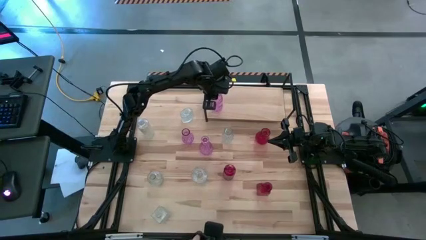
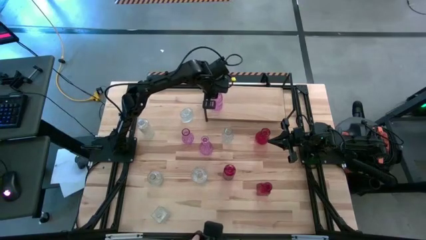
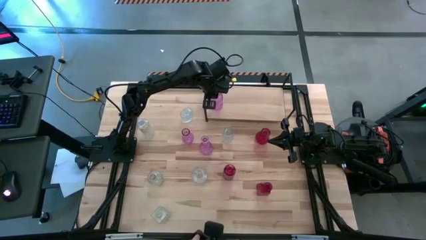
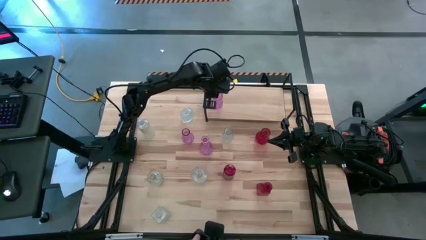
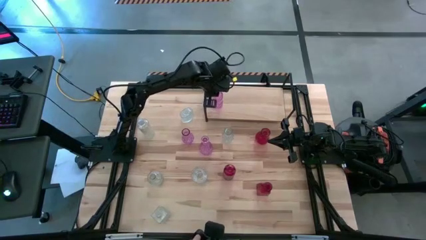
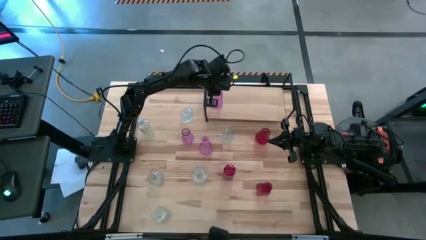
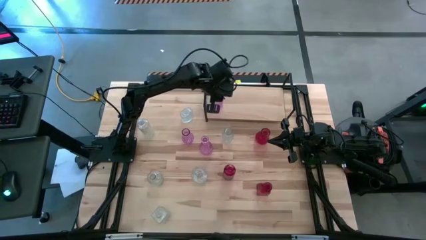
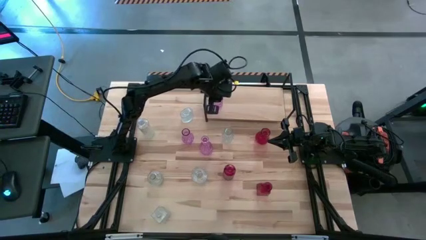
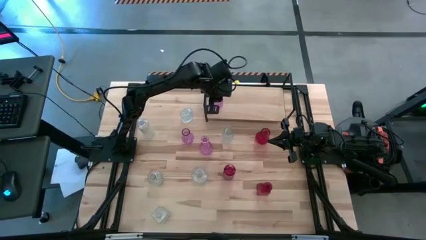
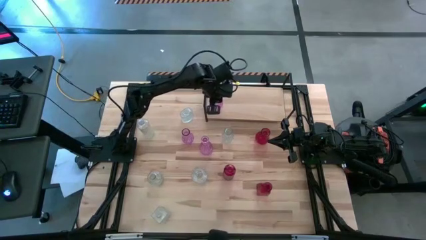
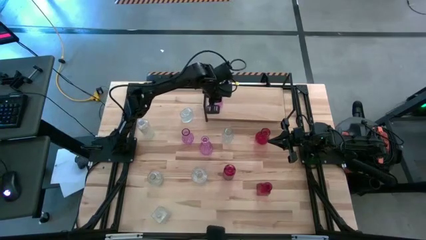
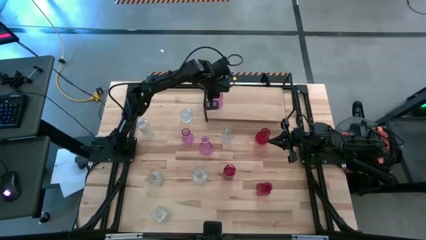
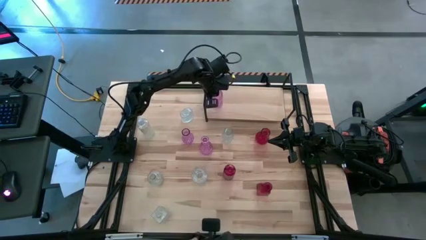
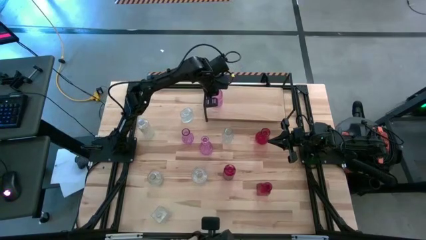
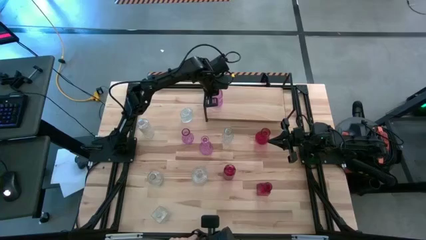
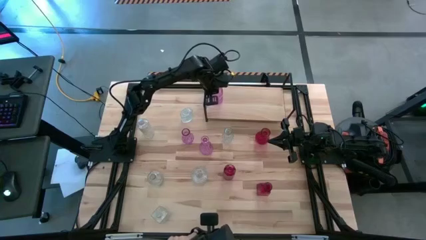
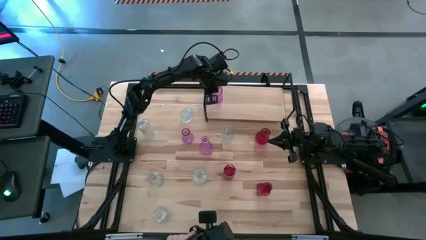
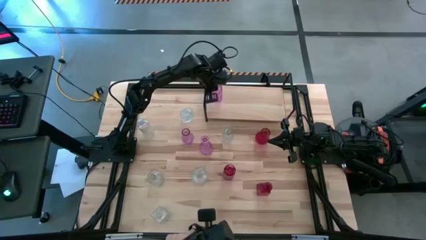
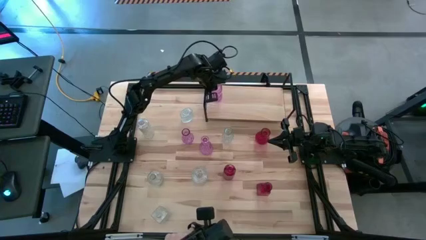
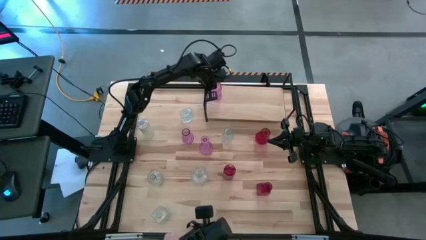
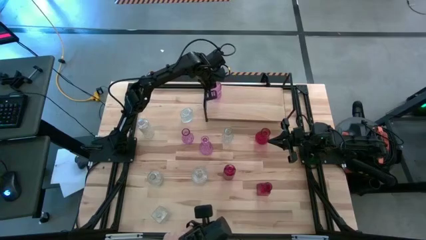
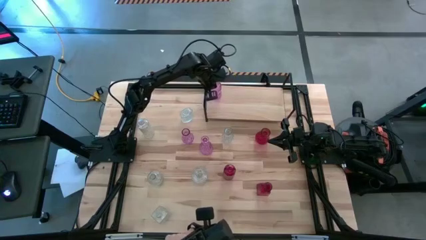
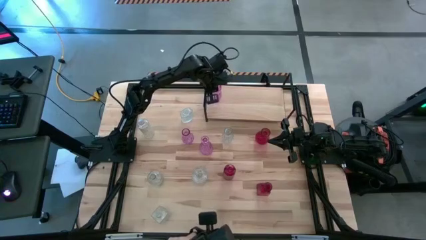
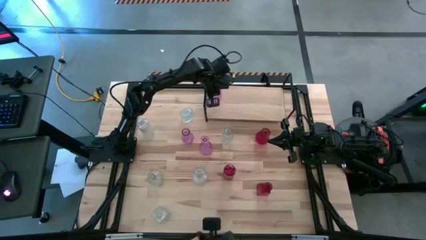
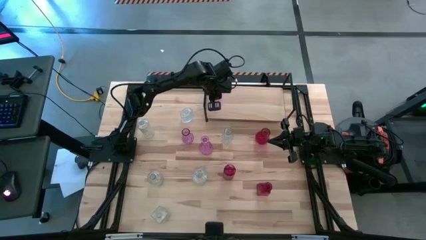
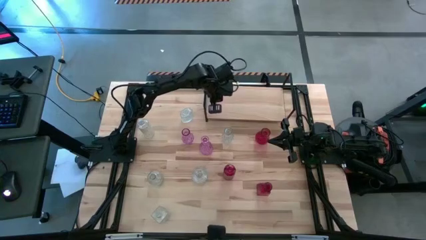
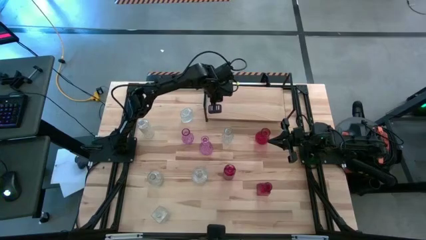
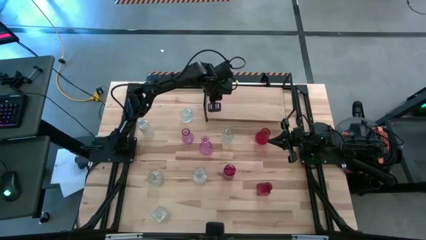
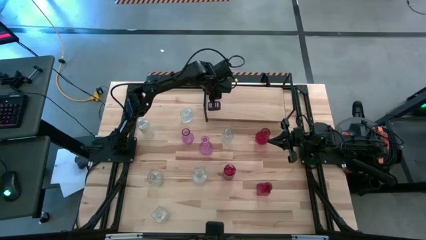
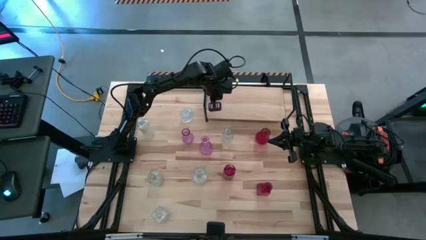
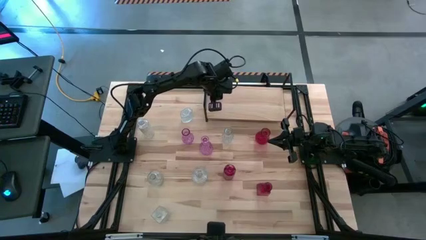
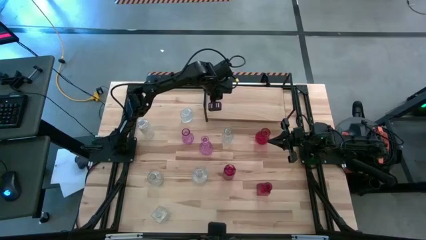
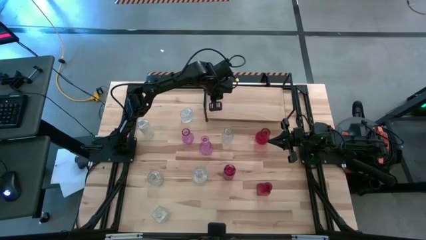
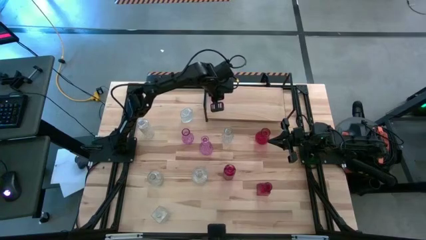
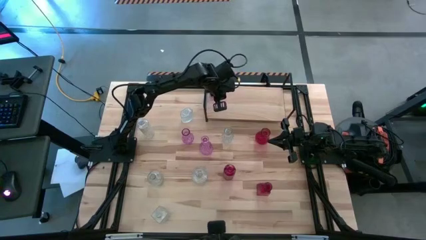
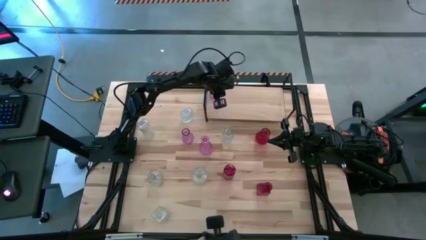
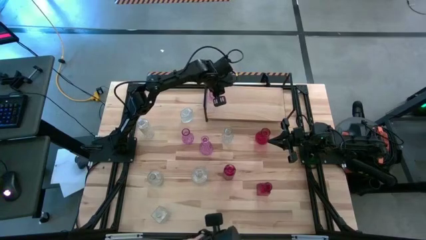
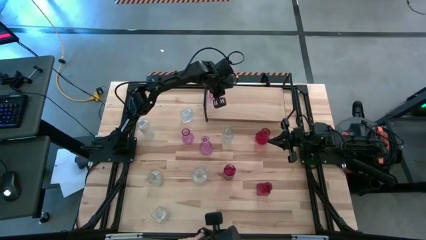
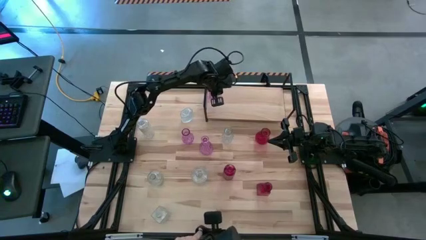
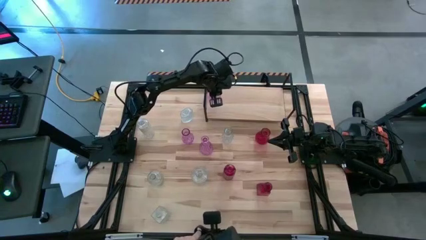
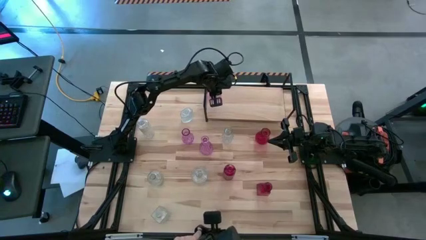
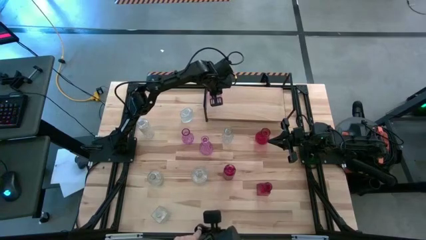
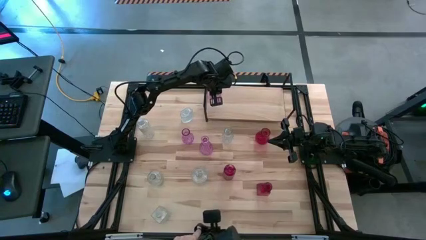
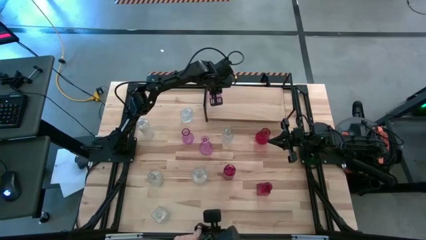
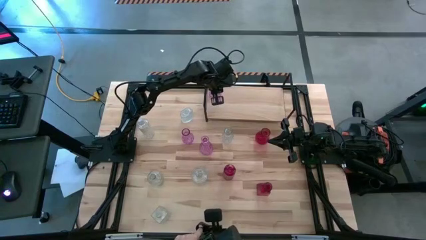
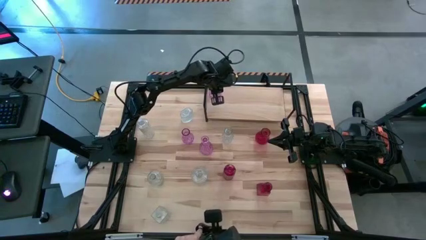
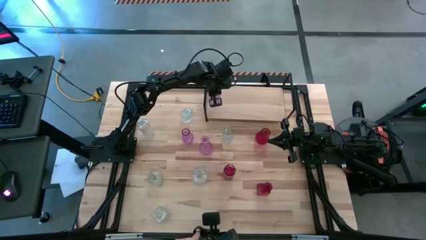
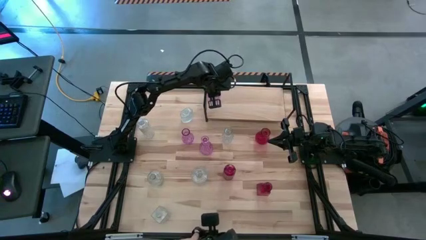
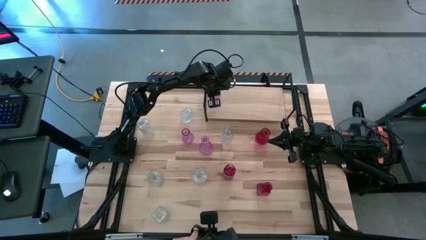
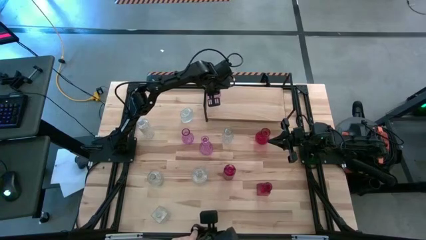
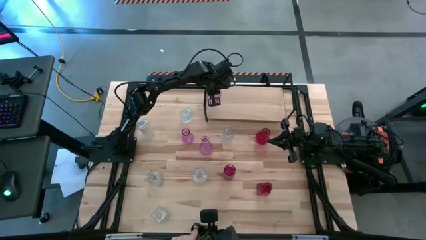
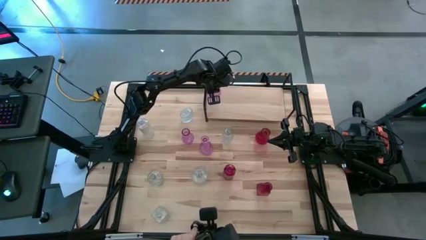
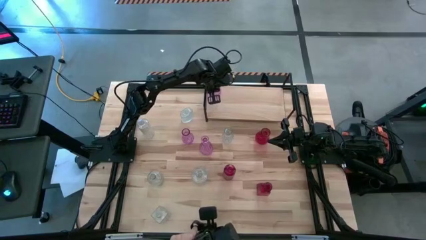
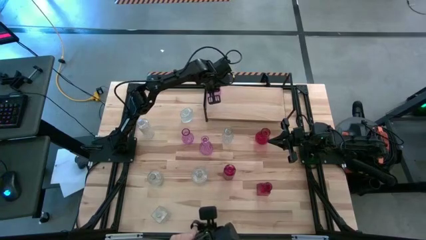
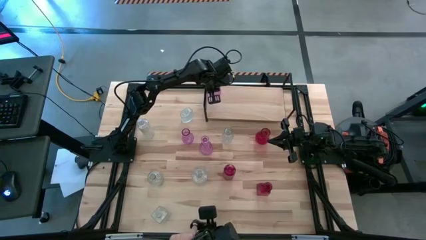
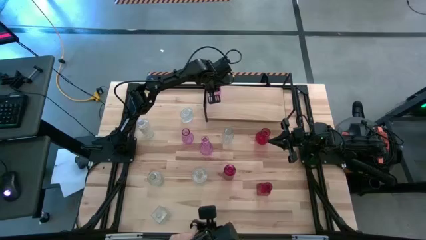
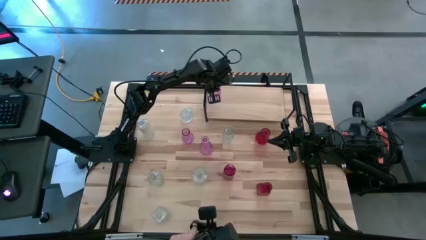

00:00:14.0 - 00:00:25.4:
Task: sort vases onto shelf
Put the violet vase on the shelf
